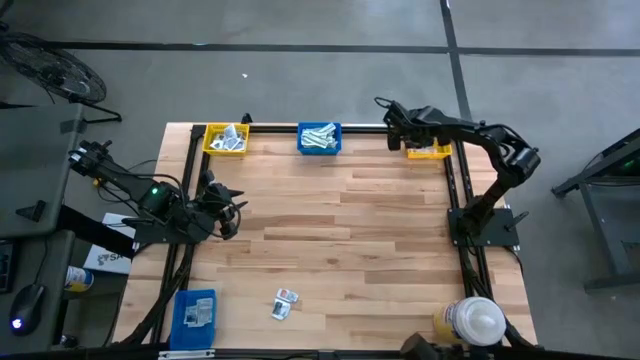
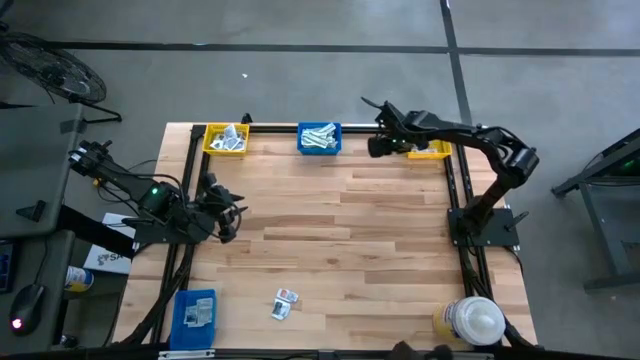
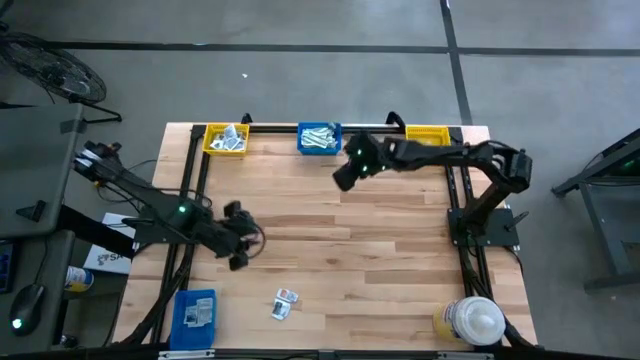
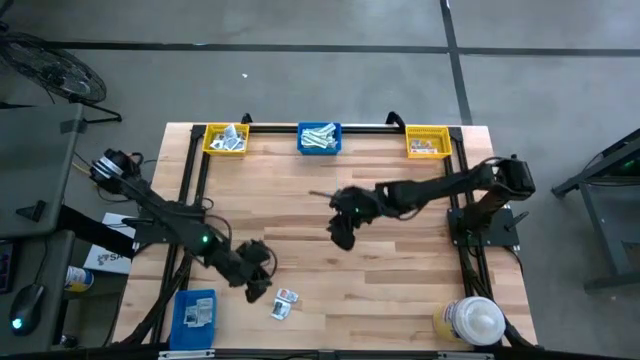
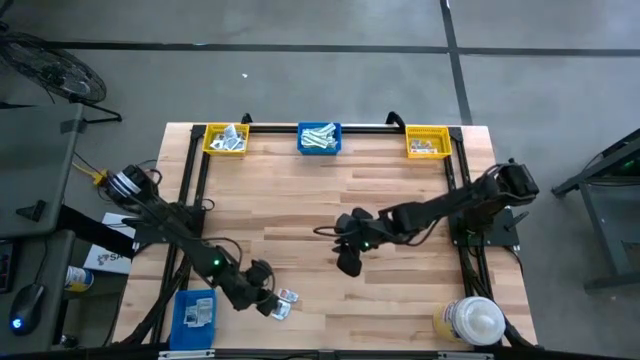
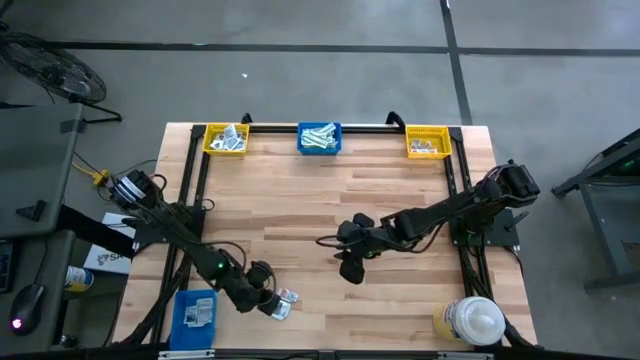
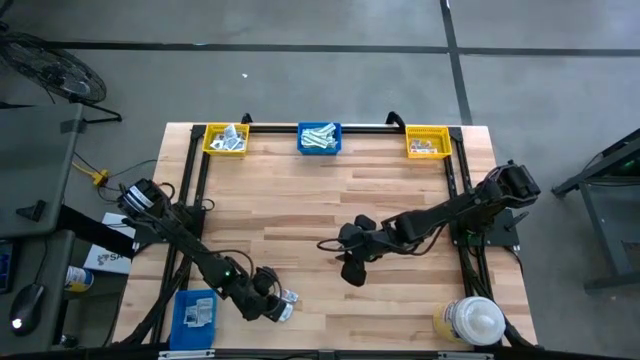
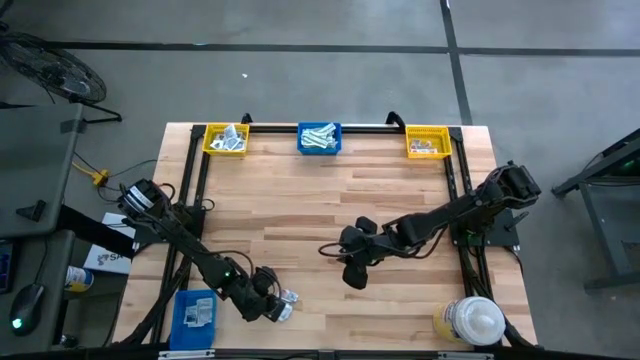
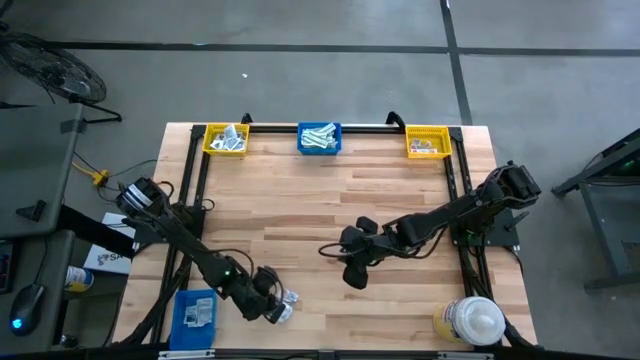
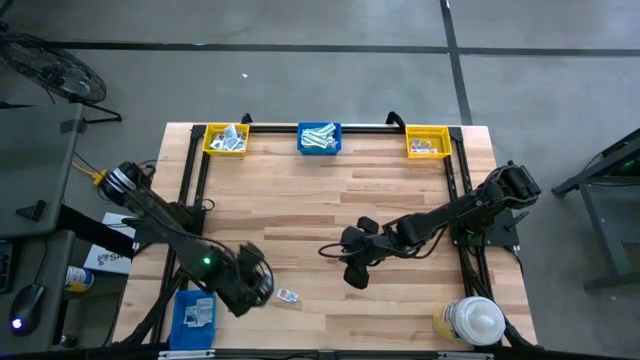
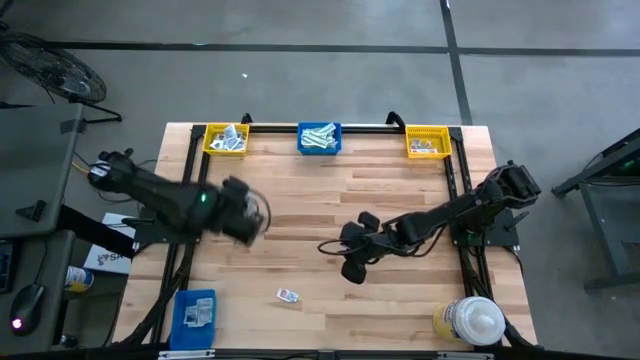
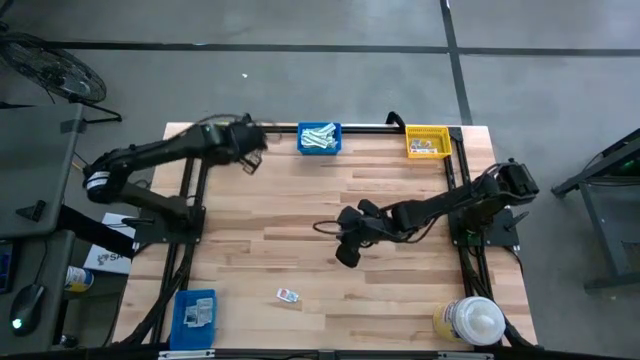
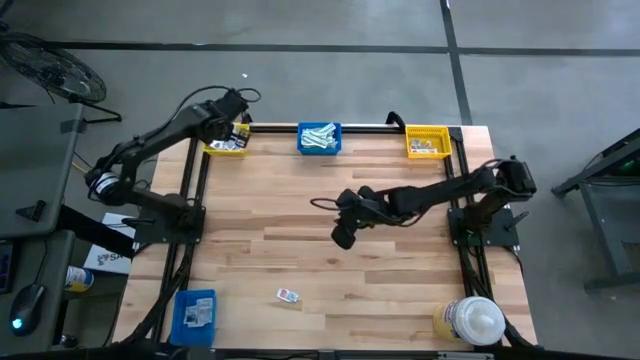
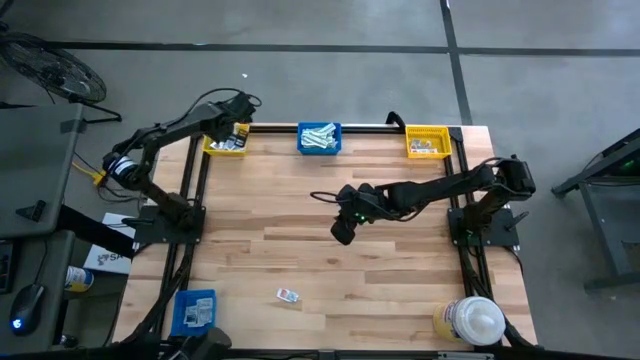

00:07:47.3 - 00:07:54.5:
Task: Pick & Place First Aid Supplies
Put the gray towelette pack into the left yellow bin

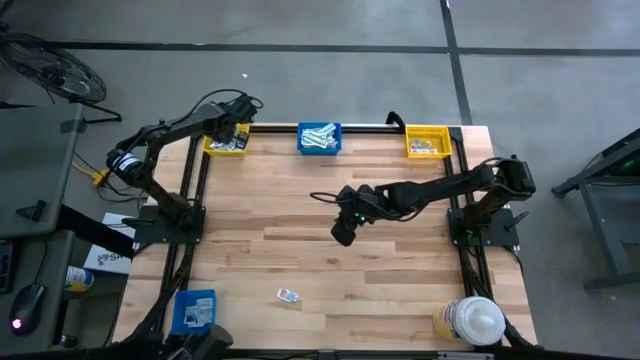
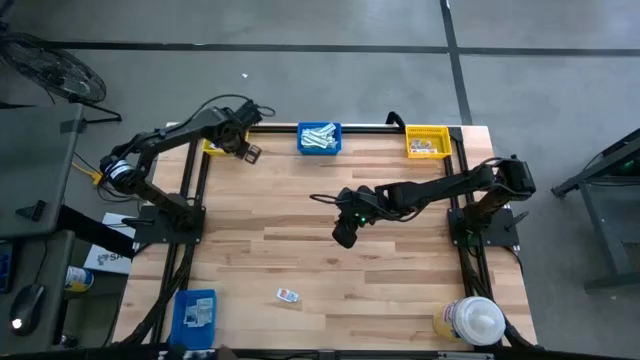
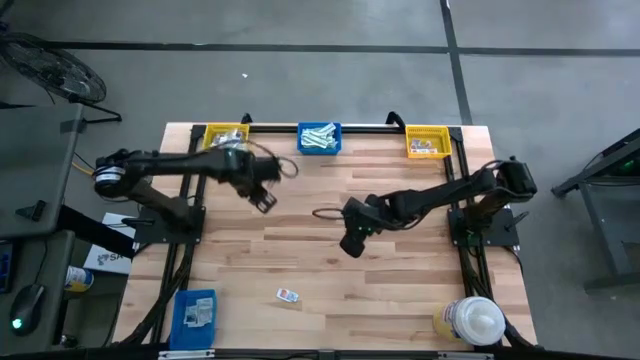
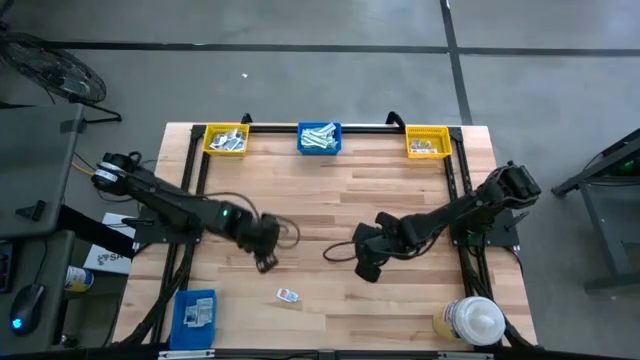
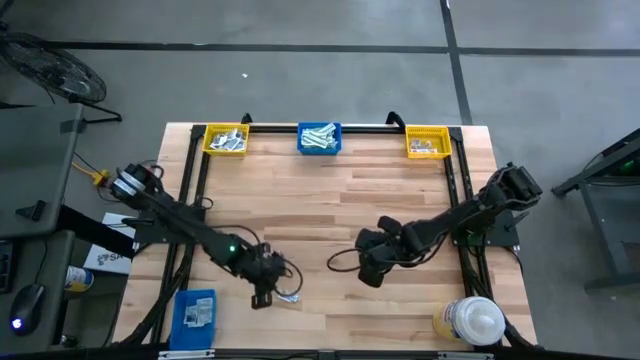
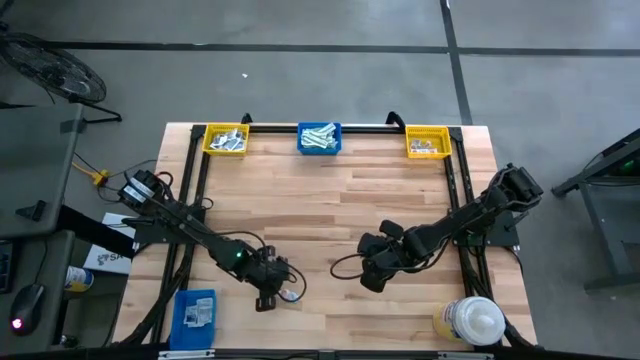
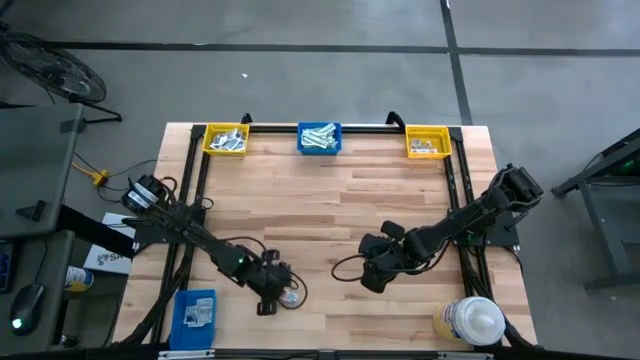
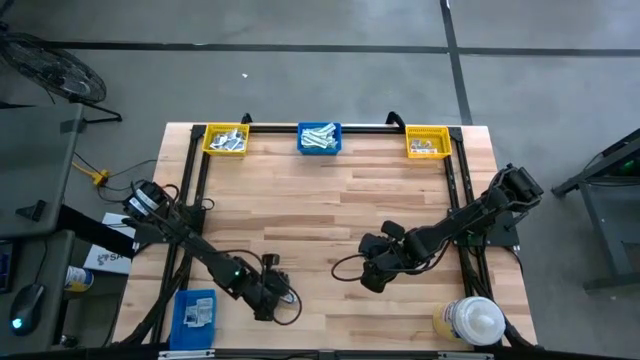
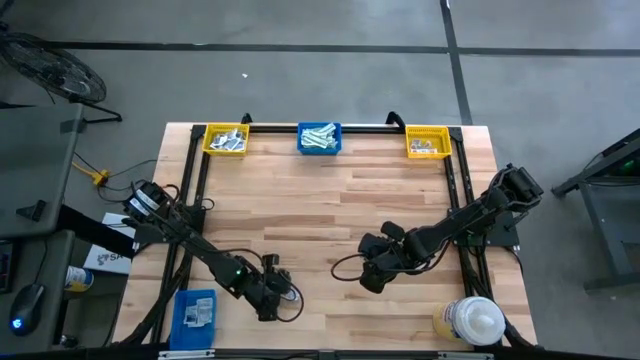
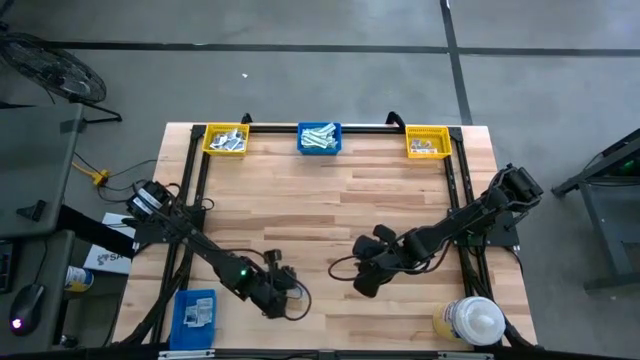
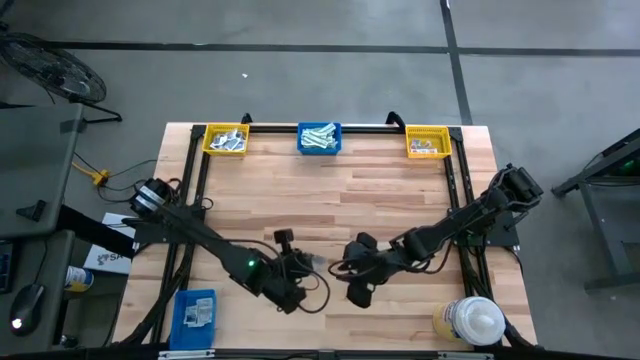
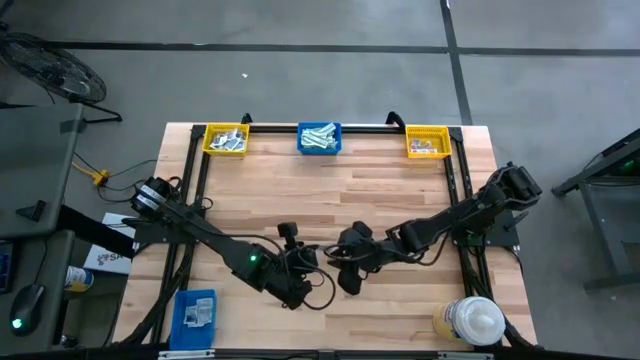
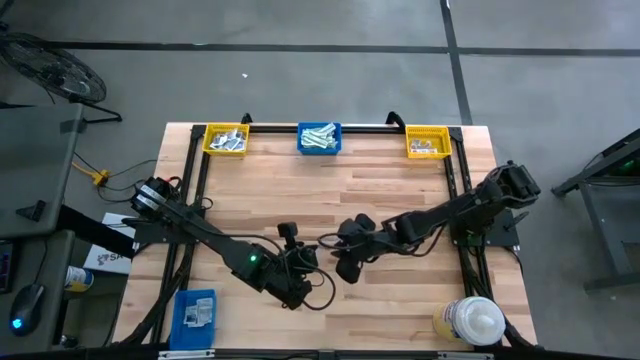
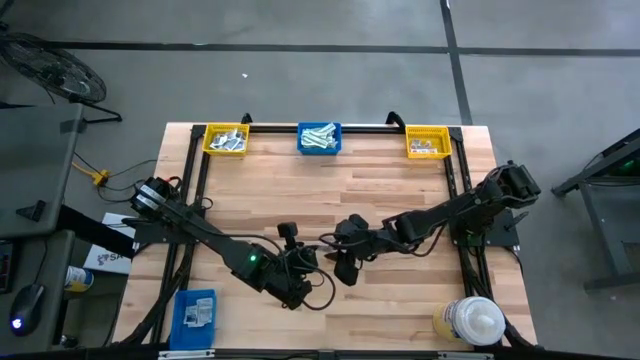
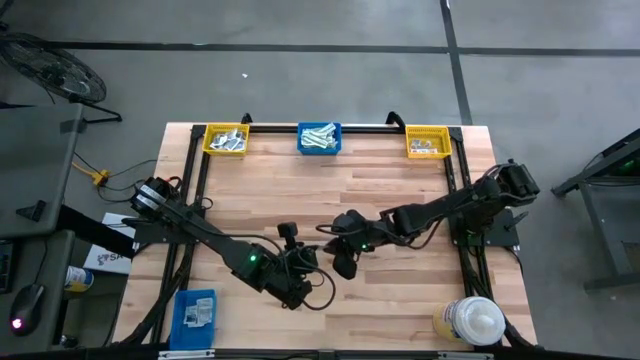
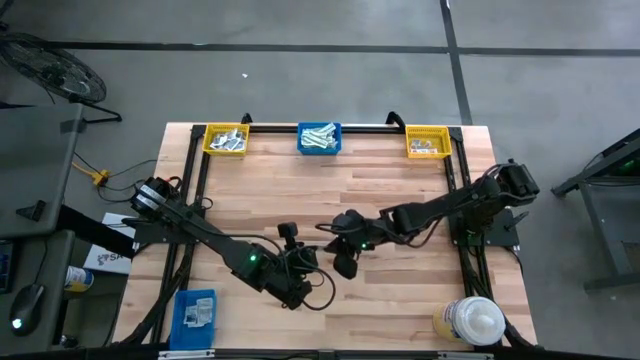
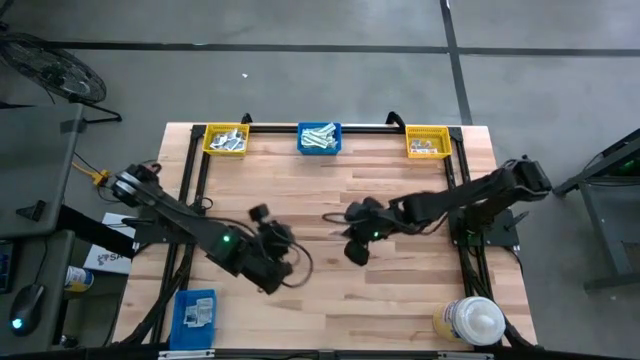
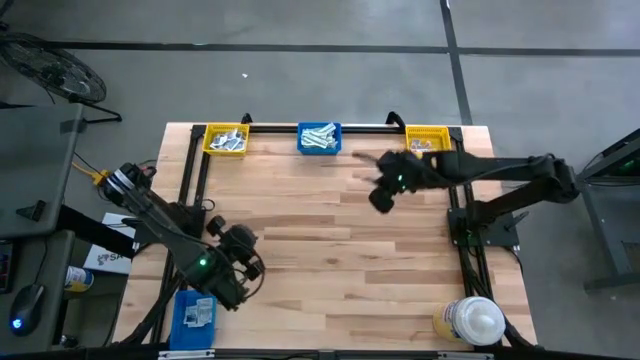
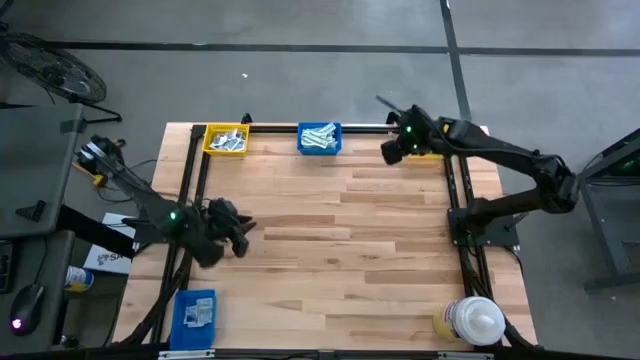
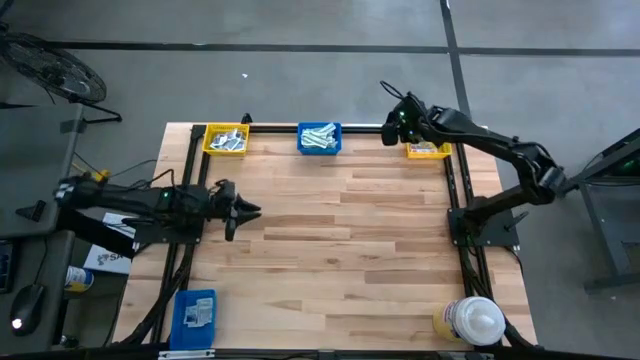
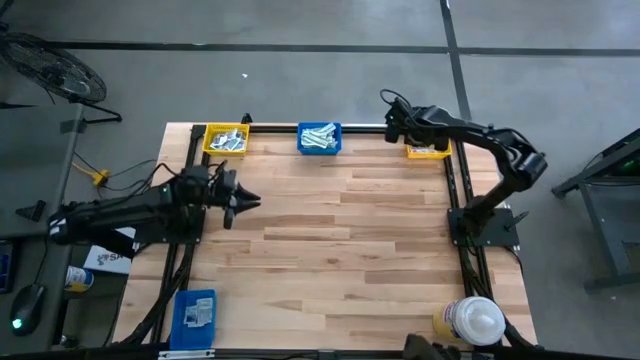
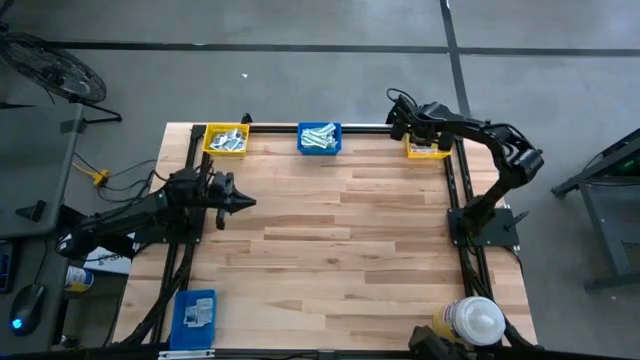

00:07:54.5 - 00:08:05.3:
Put the orange ointment pack into the right yellow bin

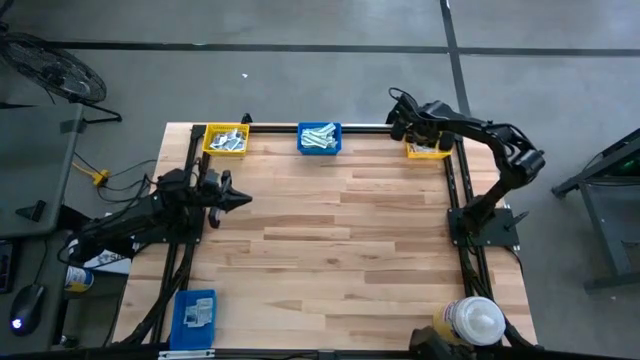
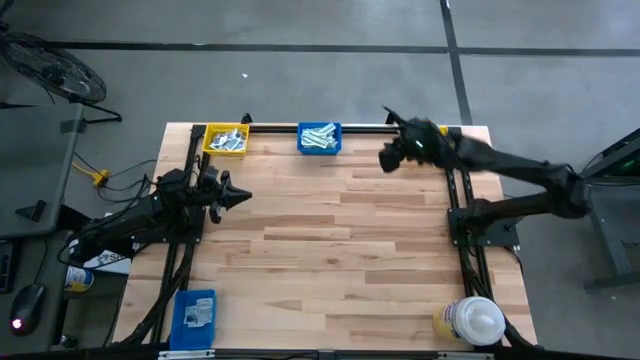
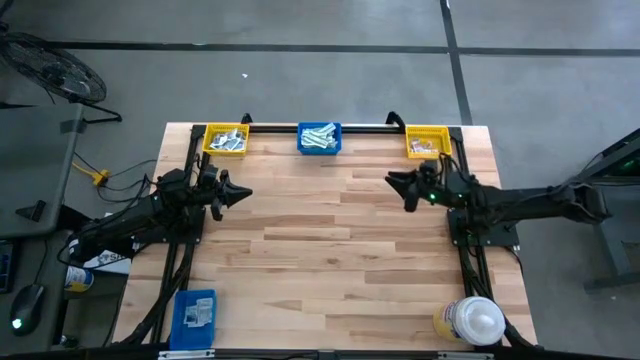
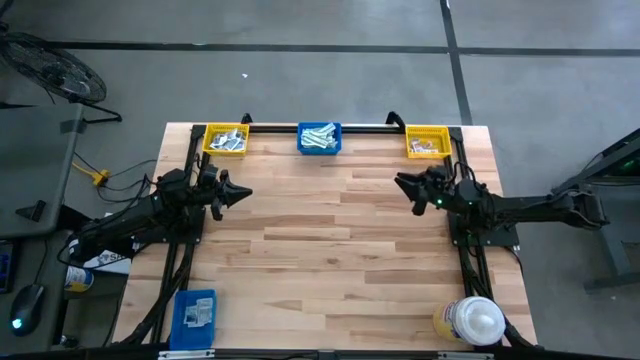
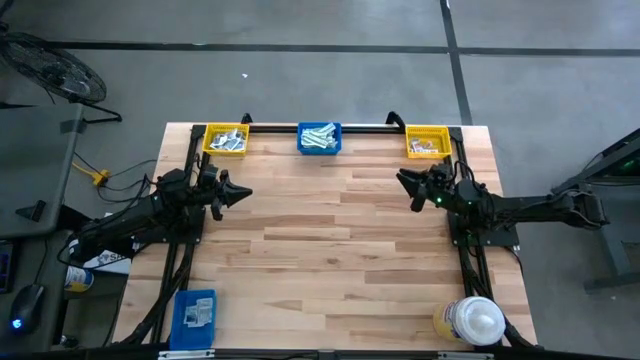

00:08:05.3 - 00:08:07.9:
Return to Home Position

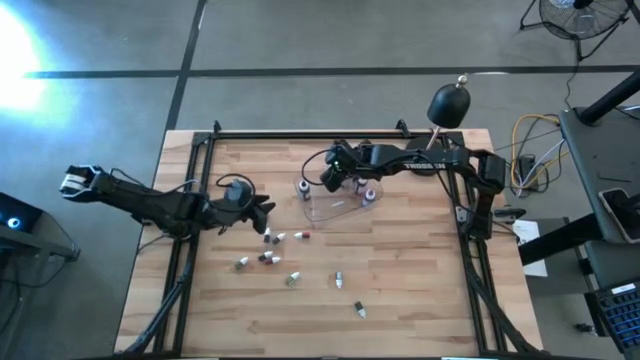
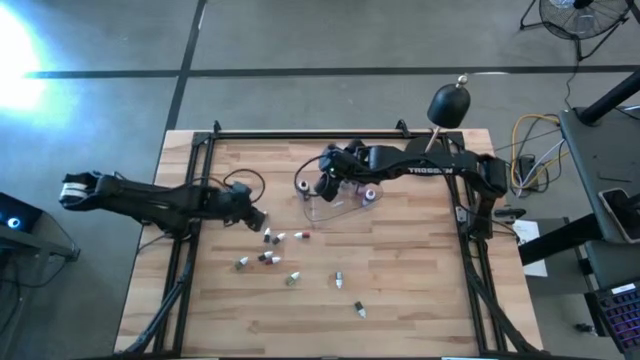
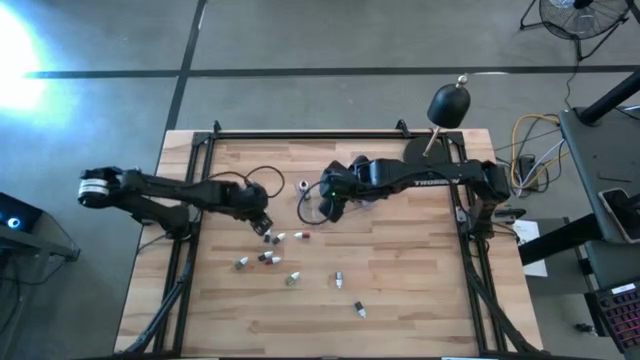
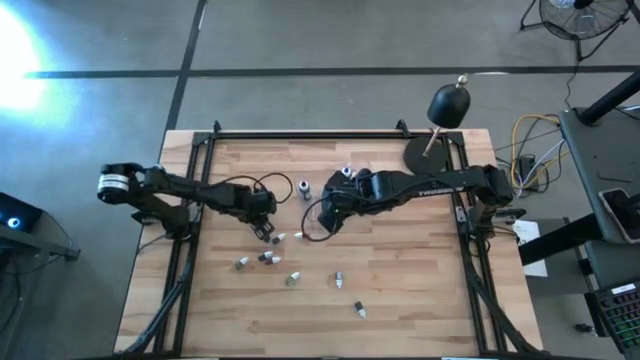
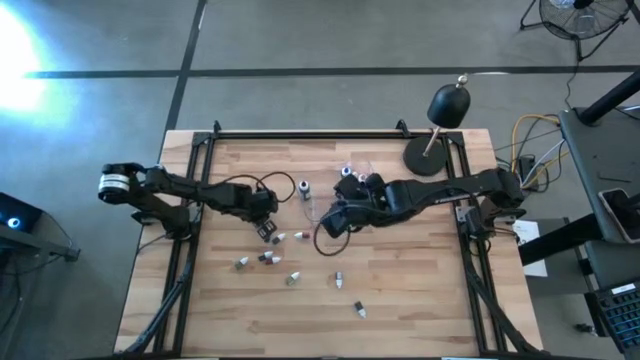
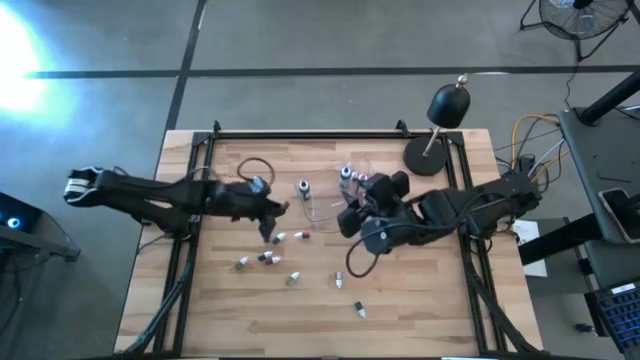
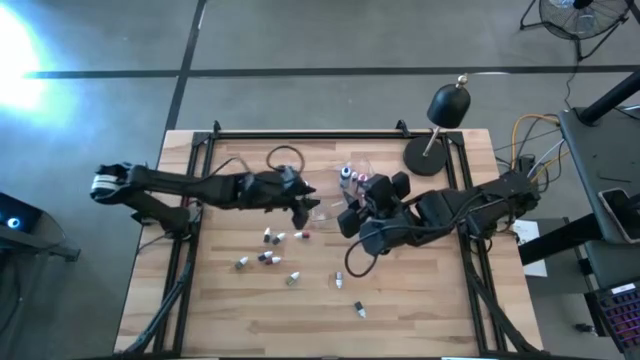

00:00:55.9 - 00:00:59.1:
Task: Pick & Place food coloring
Put the small green food coloring bottle into the transparent bin
